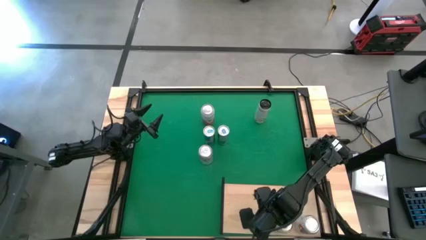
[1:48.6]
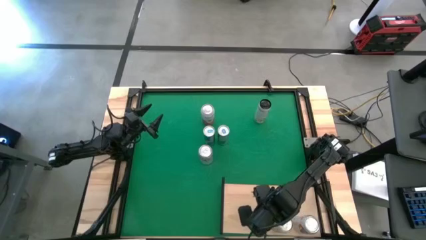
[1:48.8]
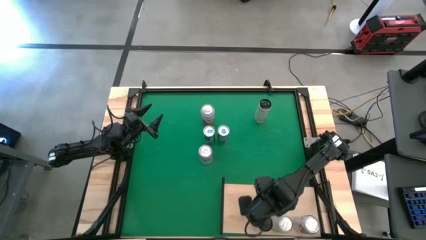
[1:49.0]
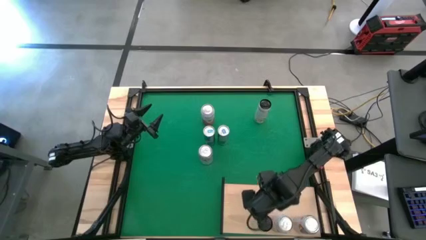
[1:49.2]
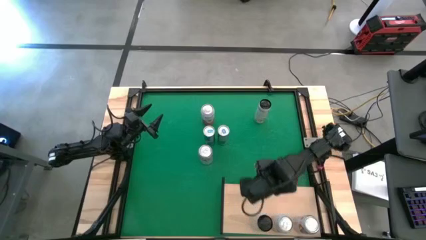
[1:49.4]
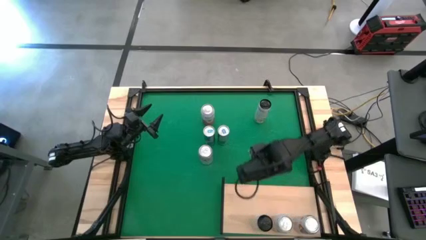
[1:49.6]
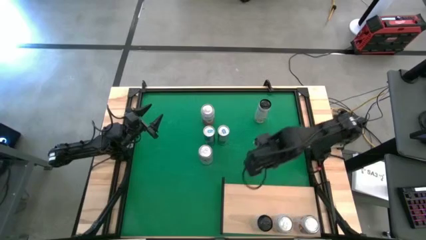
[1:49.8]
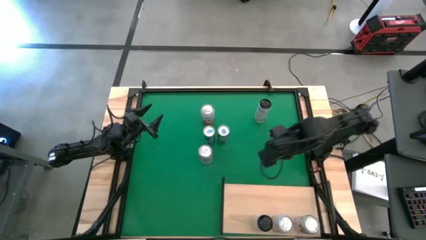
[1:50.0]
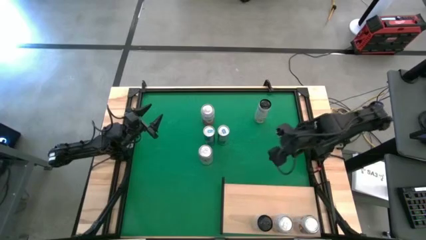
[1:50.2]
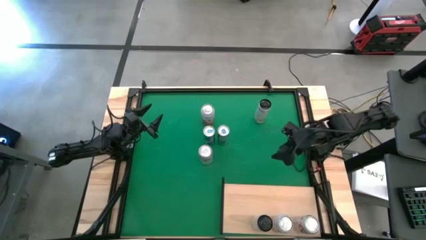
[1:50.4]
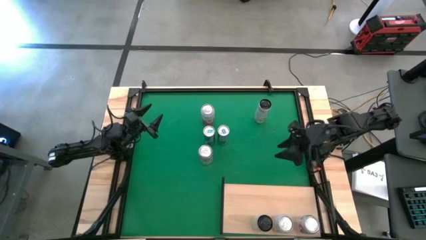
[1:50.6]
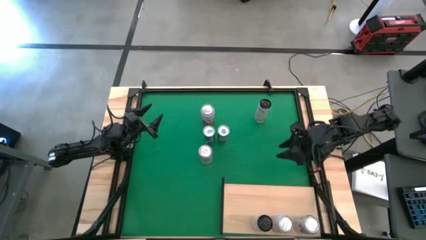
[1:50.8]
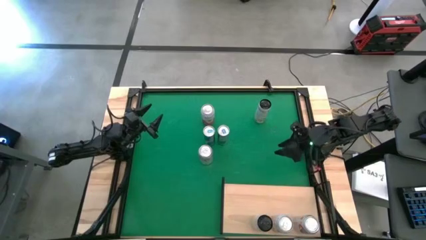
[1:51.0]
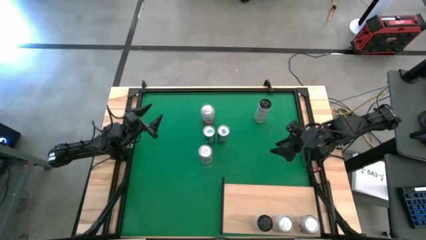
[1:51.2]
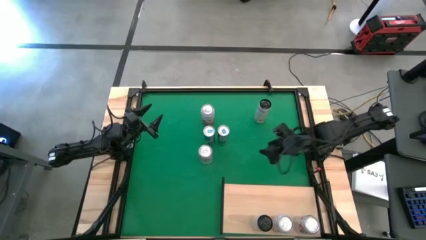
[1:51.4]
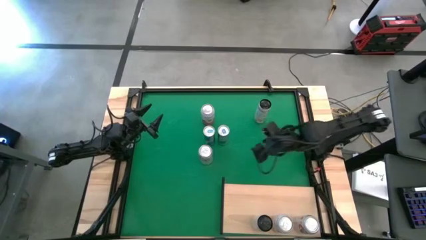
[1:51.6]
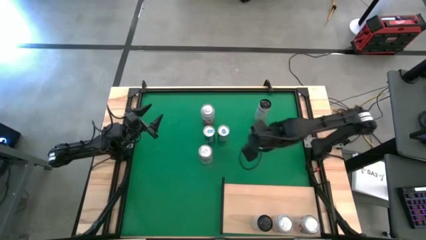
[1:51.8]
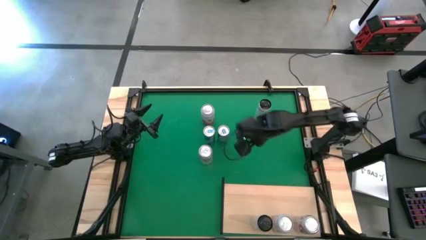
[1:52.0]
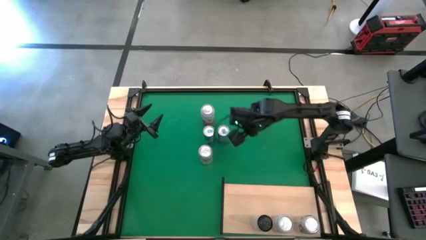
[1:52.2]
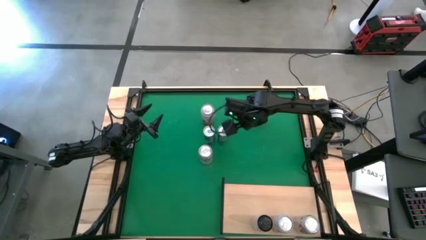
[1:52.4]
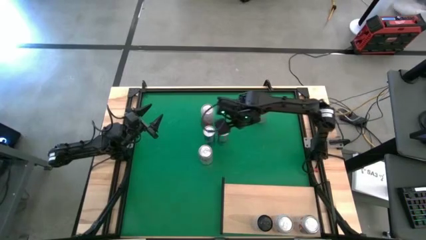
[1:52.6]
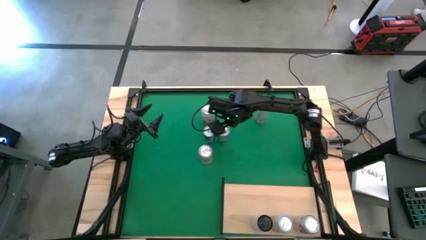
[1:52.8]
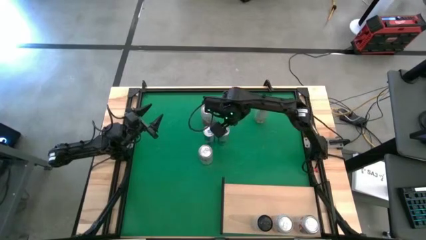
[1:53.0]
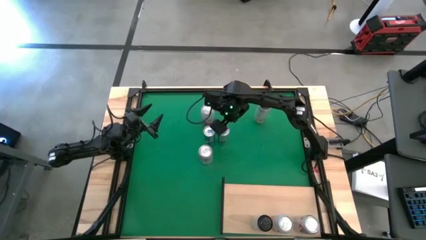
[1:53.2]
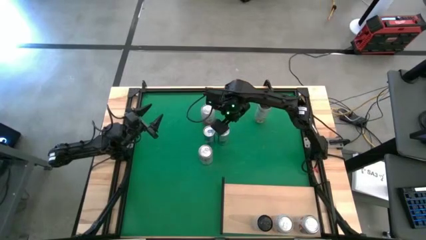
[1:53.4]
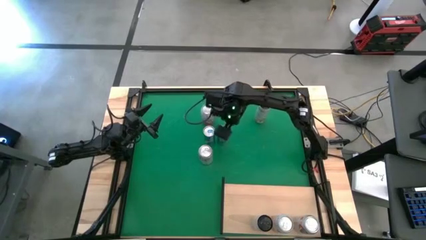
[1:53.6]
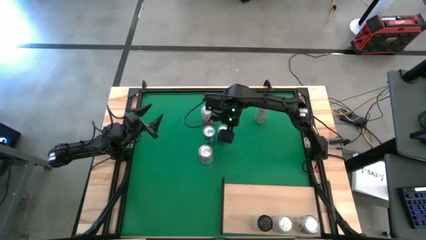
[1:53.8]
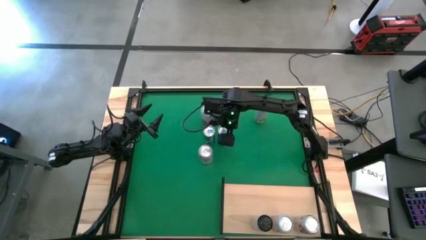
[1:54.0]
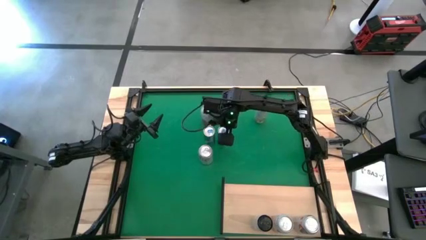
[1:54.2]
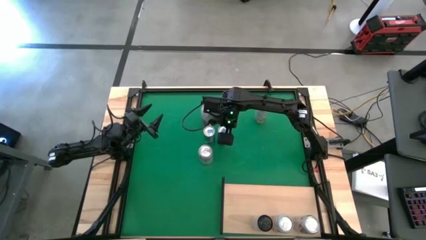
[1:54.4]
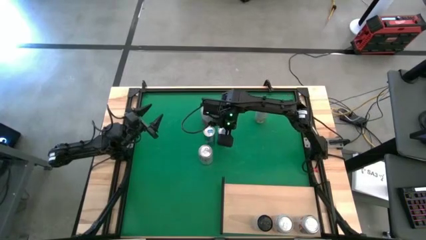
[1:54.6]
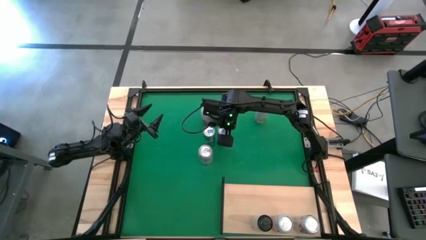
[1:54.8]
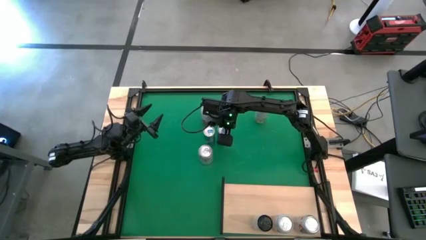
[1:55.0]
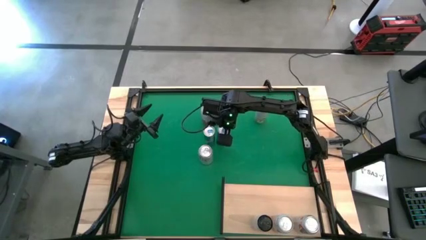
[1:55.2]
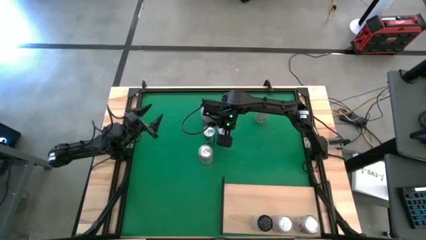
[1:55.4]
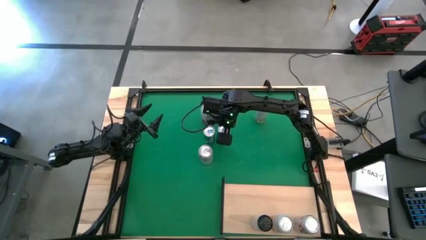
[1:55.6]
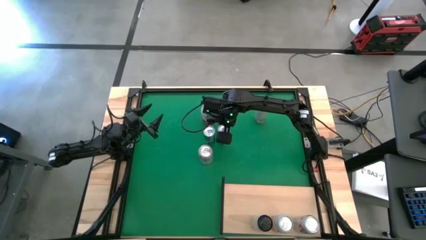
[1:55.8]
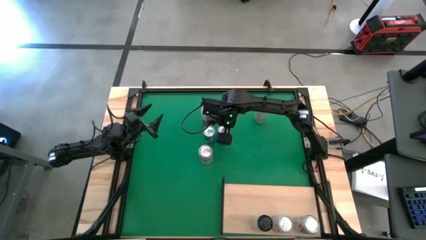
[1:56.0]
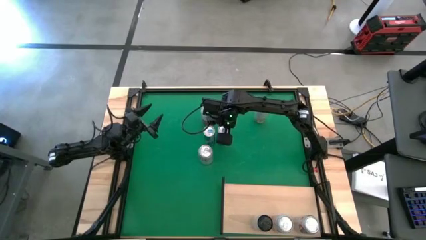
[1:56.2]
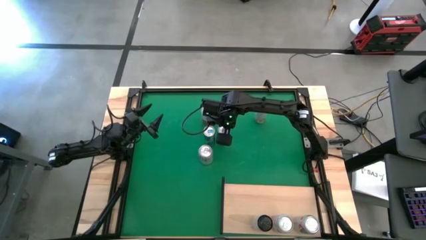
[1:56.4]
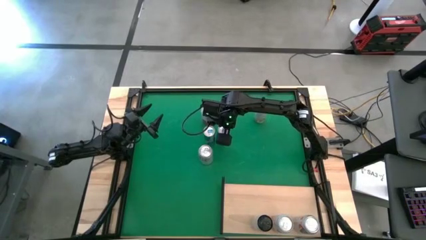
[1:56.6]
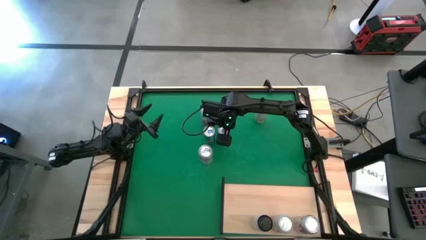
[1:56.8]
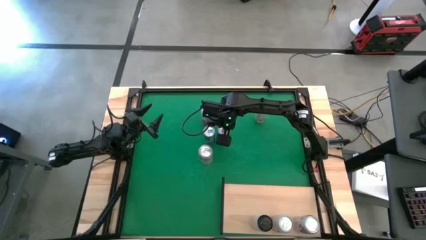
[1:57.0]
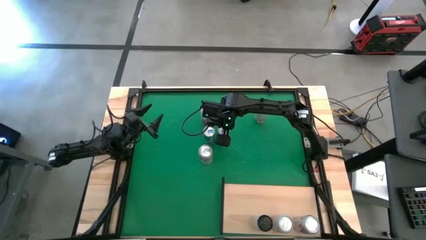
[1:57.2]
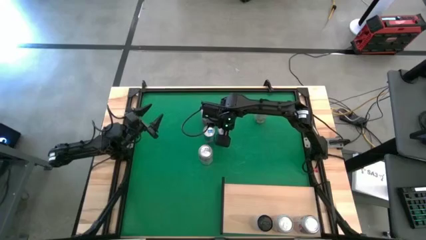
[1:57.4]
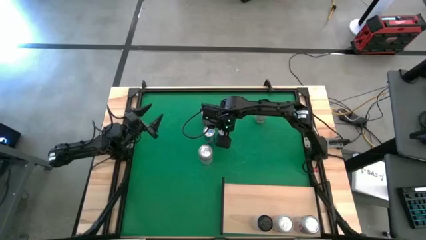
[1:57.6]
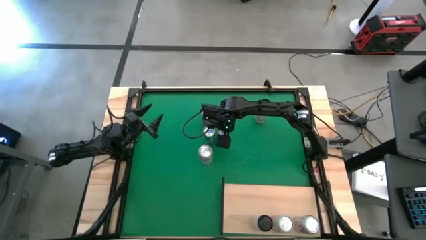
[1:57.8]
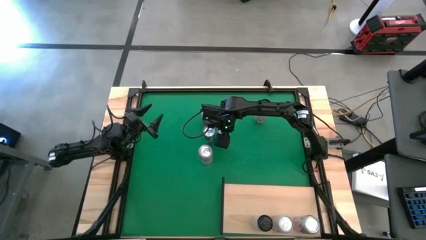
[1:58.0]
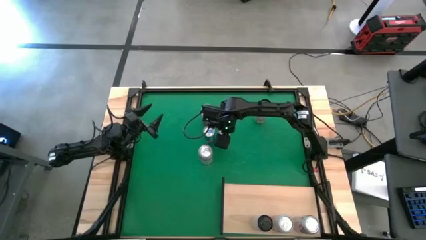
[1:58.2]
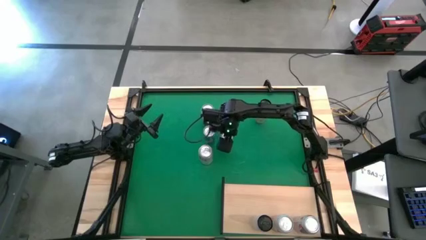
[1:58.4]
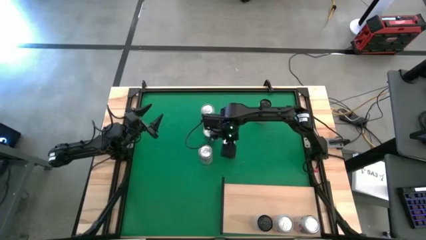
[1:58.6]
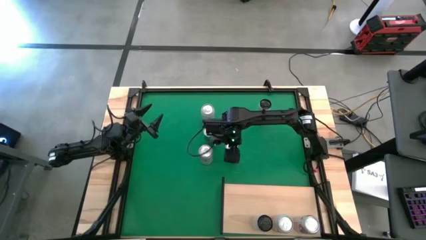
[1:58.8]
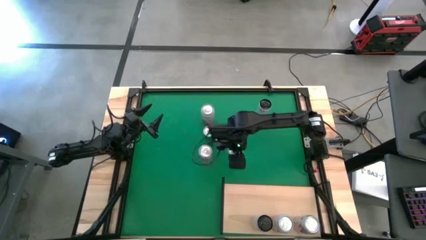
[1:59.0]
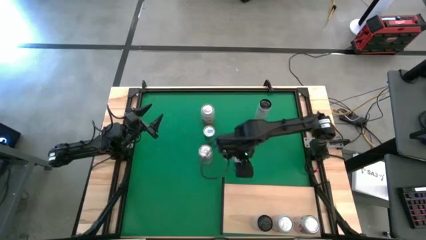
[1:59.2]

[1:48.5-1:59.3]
Task: Place canned beverage on shelf
Put the right blue soda can on the shelf

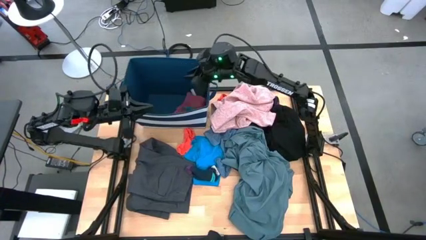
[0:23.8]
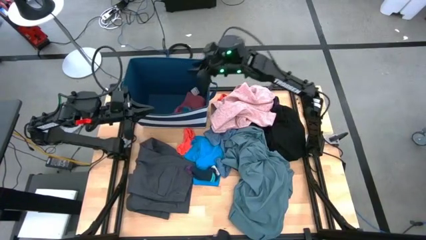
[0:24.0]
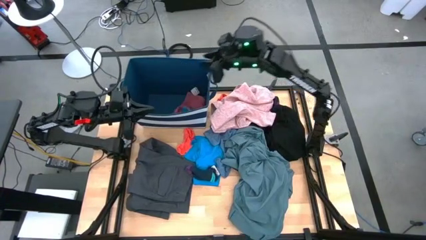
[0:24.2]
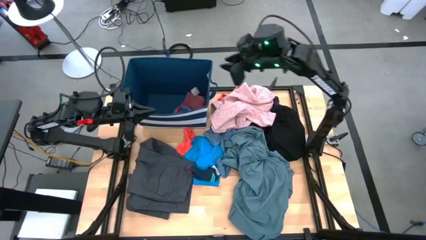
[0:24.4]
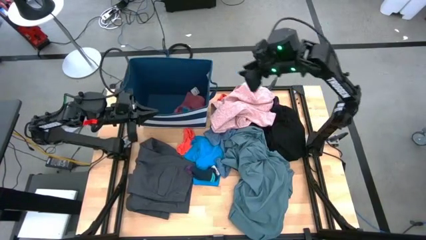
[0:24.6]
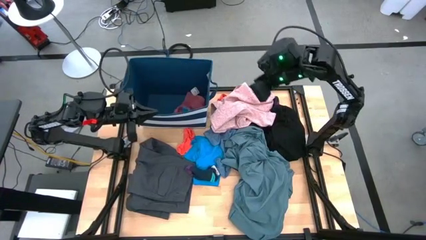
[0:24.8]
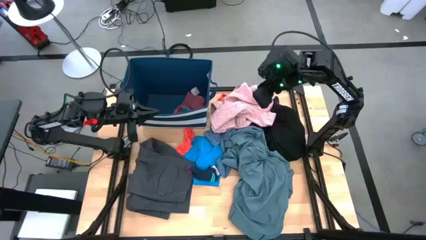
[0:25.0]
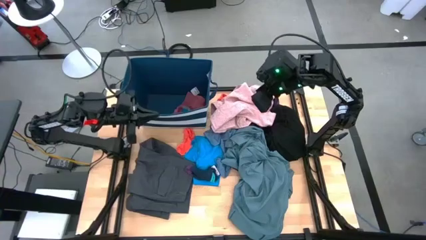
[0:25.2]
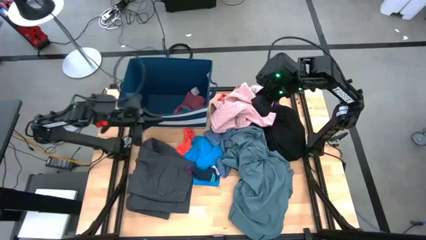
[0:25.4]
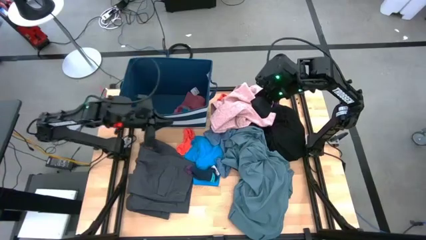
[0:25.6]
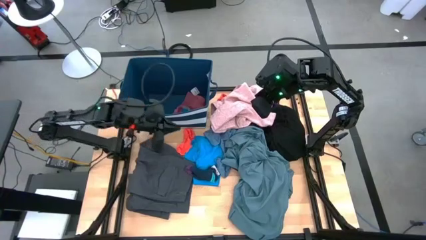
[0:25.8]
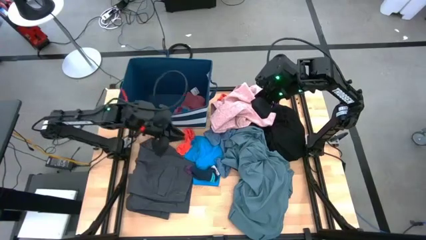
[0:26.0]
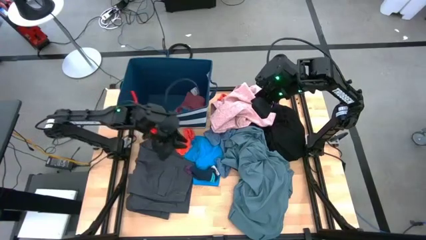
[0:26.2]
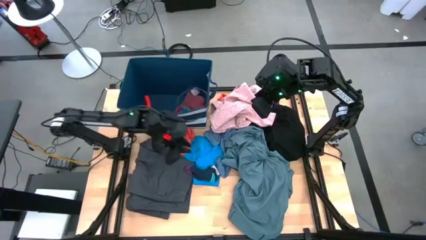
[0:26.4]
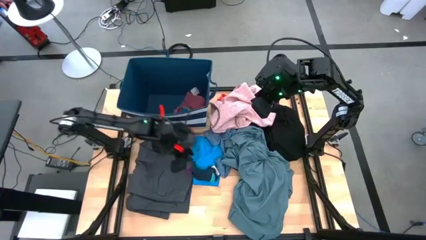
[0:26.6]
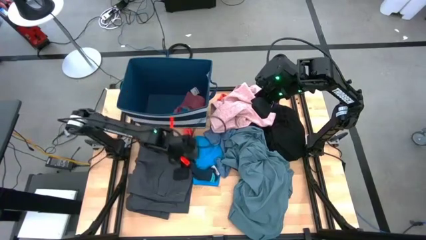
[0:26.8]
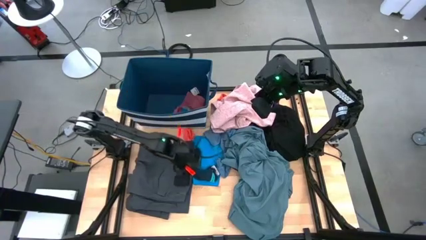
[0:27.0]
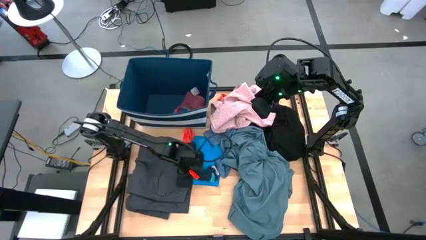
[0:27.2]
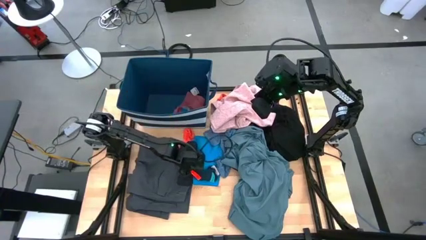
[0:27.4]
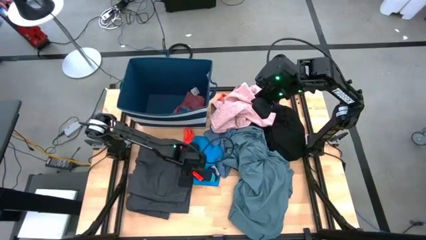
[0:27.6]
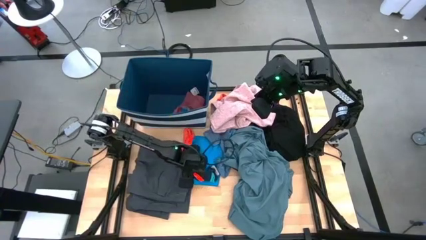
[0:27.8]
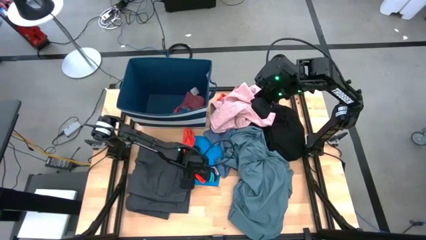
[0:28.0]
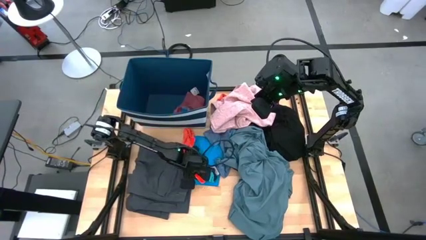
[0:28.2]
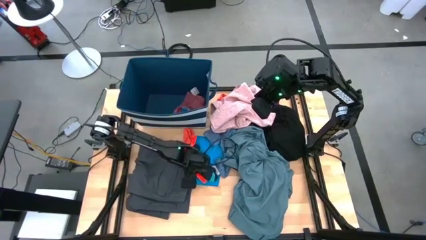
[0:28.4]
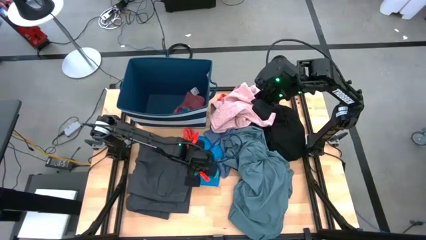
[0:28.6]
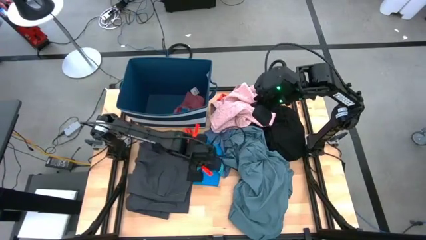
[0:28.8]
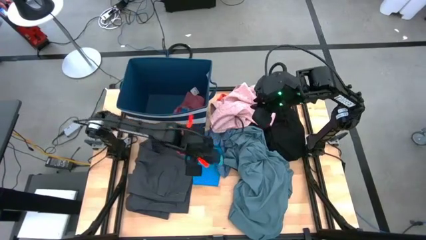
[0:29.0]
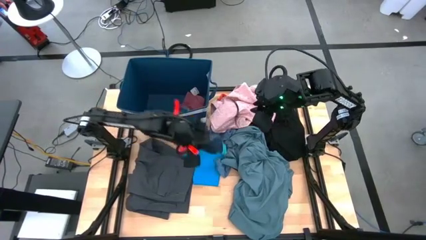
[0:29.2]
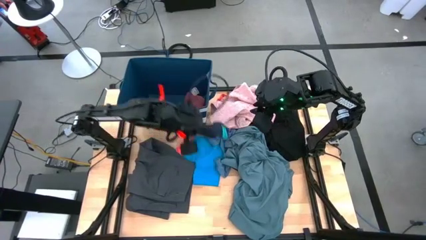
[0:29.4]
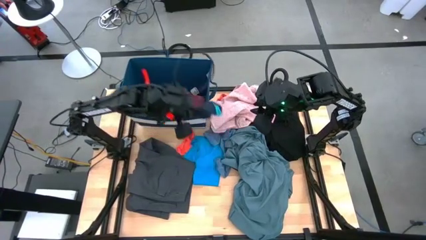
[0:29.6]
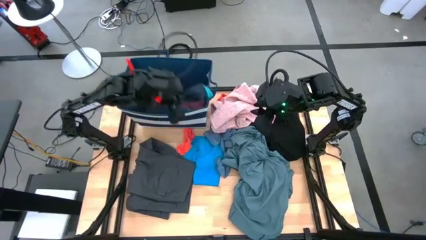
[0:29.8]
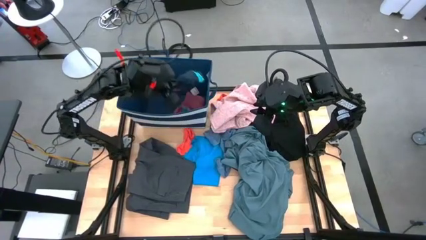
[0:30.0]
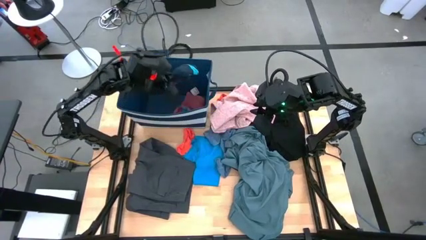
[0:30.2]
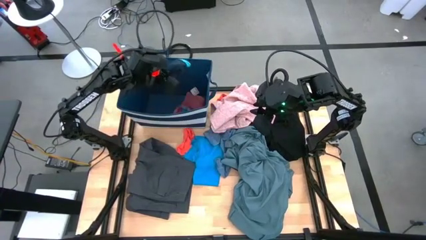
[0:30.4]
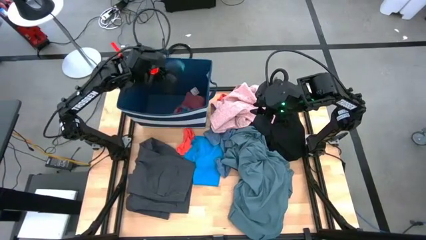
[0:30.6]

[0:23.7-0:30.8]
Task: Sort clothes
Put the blue sock into the blue laundry bin
